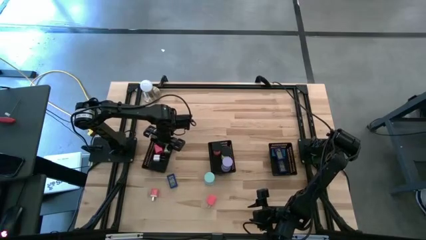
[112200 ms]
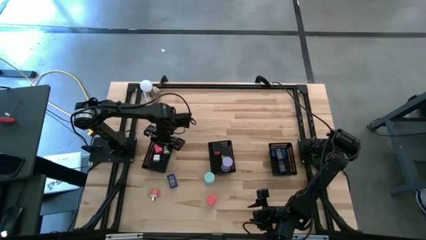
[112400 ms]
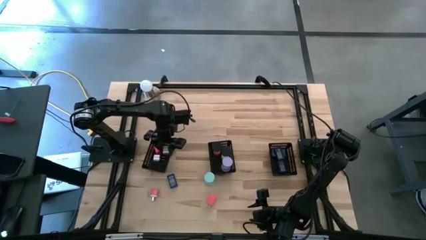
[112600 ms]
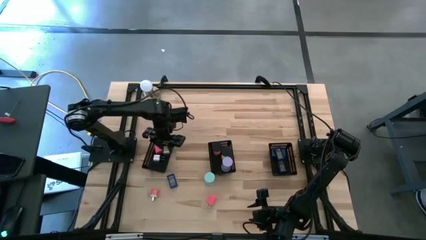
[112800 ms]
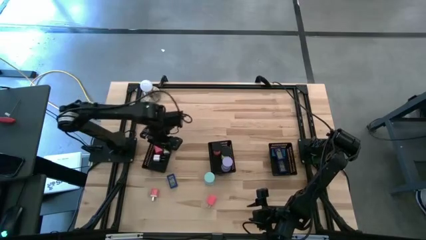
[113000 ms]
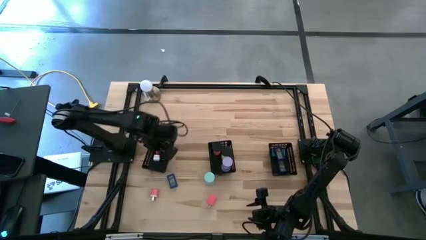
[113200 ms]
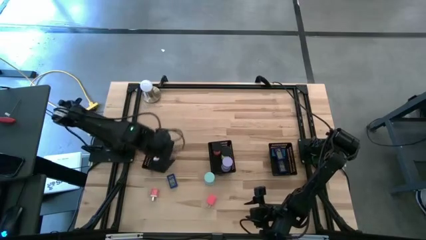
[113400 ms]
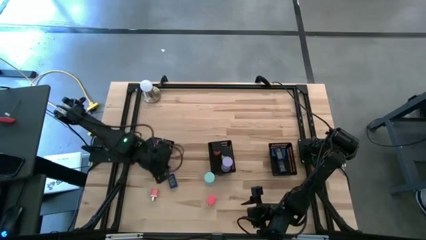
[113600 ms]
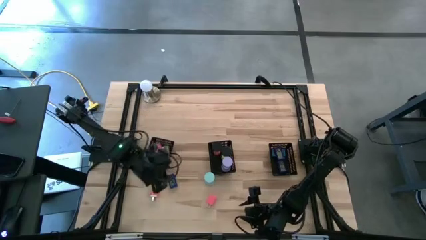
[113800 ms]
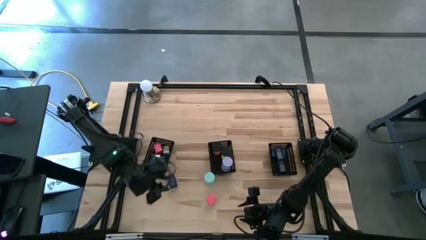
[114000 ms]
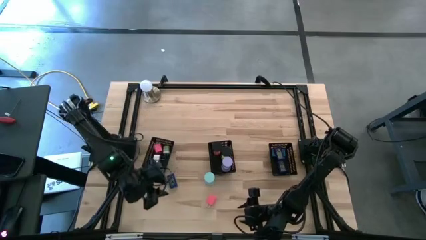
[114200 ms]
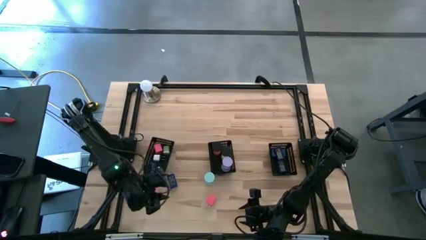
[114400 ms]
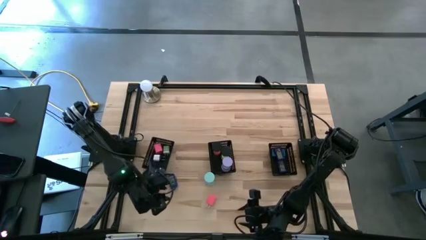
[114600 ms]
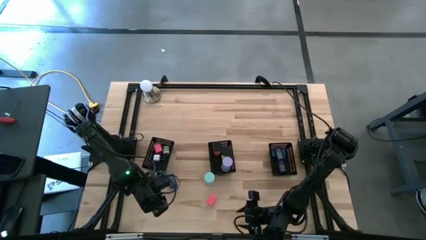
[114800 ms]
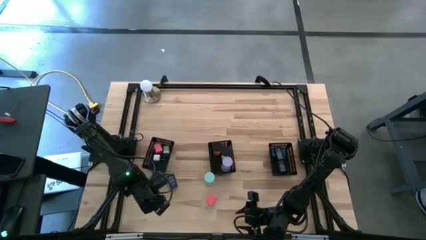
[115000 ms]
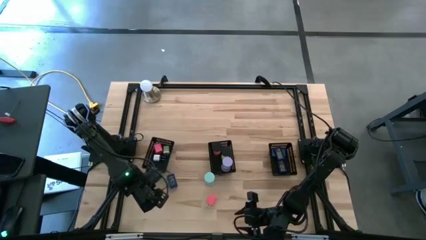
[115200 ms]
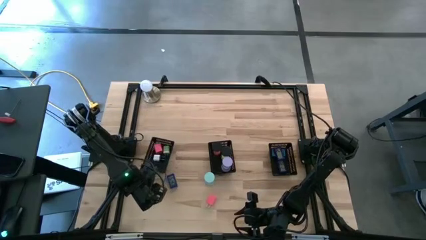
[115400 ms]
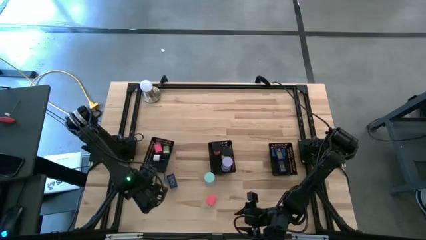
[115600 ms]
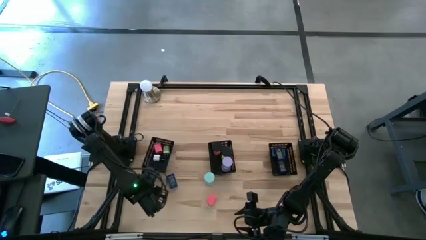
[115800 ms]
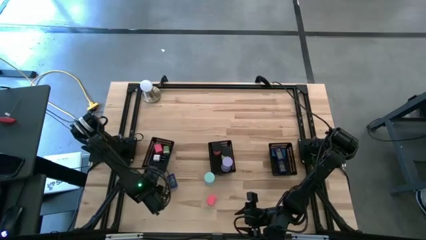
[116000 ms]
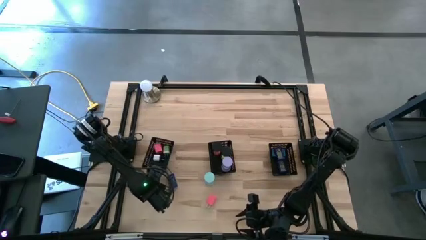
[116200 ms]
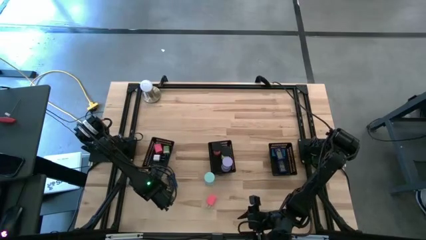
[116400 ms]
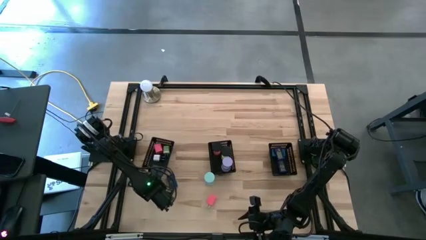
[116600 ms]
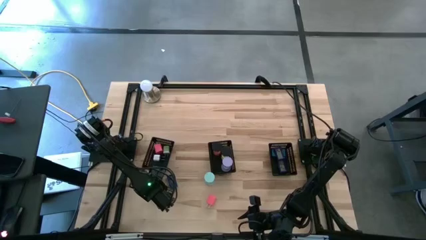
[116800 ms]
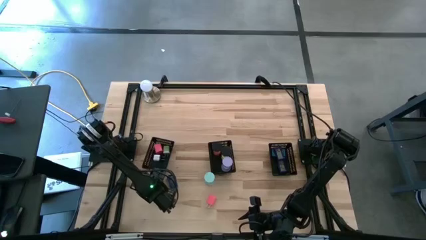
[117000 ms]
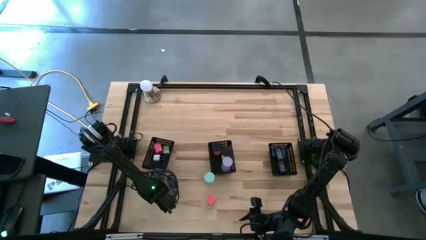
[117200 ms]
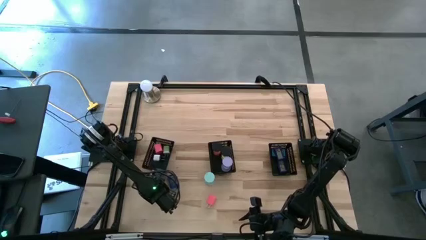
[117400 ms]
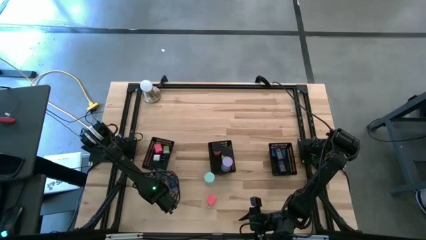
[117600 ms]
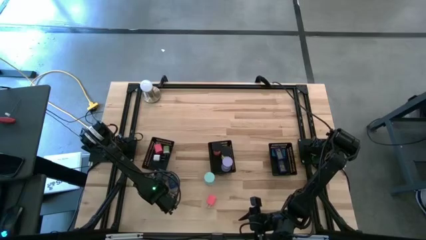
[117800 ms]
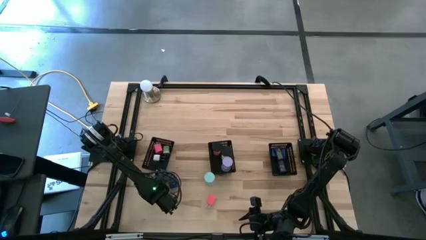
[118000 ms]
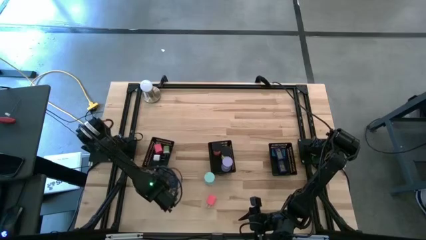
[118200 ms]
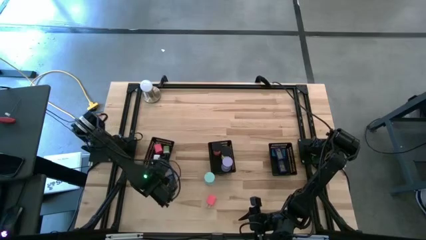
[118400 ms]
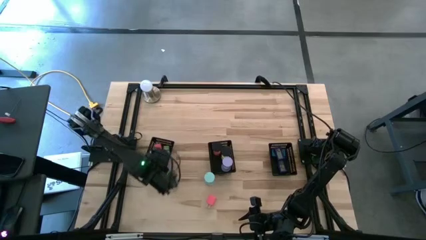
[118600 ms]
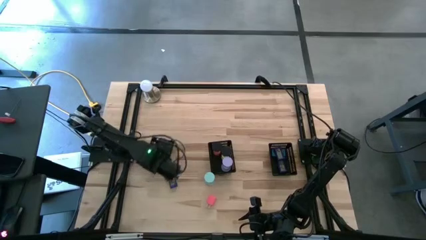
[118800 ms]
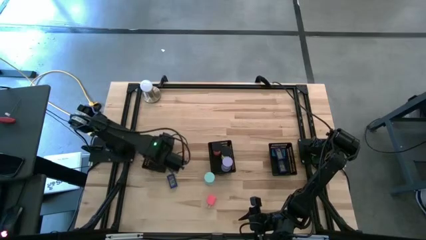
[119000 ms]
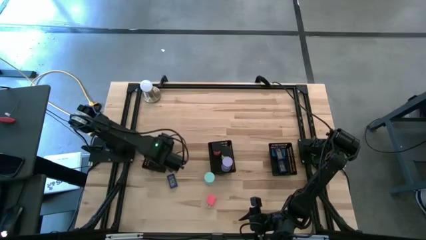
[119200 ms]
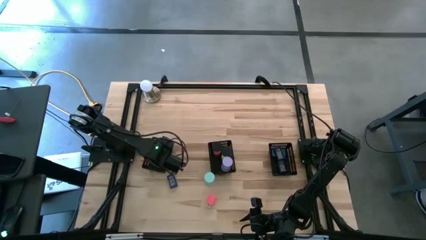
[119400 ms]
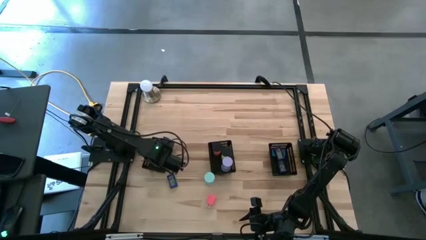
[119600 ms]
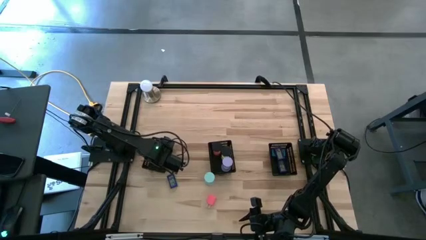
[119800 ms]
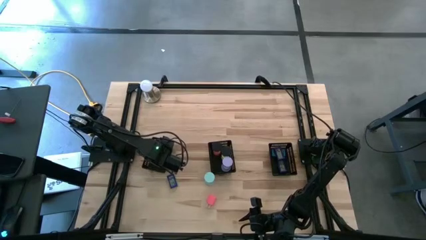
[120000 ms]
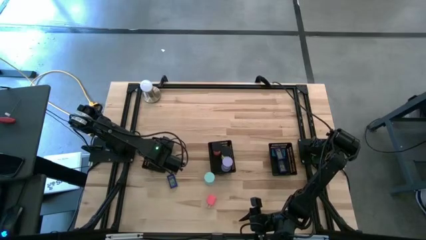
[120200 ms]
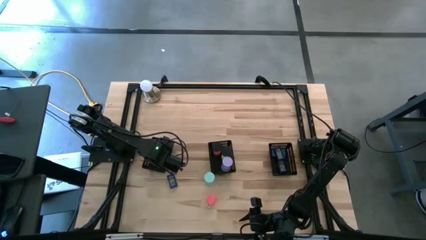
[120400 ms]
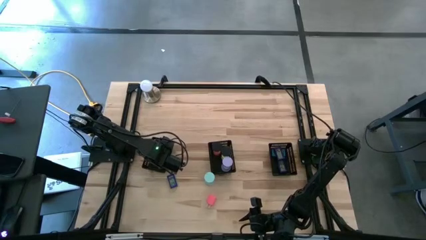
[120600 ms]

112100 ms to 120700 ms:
Task: Pick & Place Office items
Put the white pink charger adapter into the left black bin

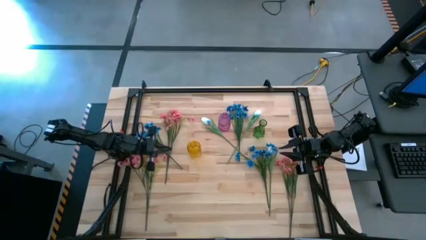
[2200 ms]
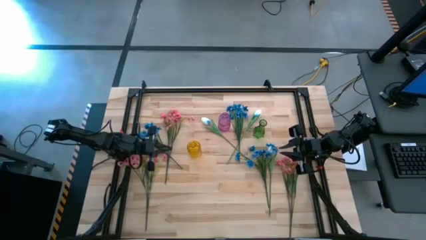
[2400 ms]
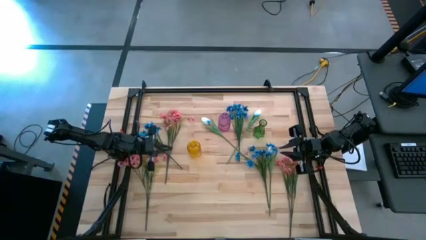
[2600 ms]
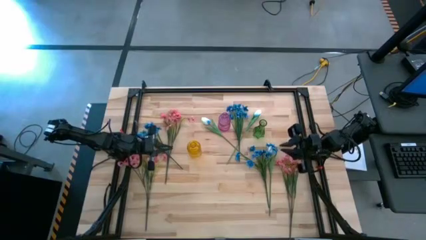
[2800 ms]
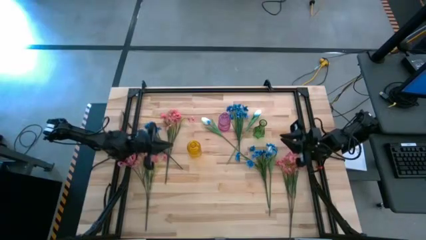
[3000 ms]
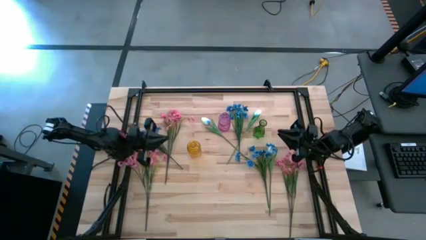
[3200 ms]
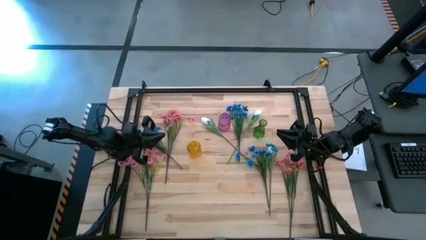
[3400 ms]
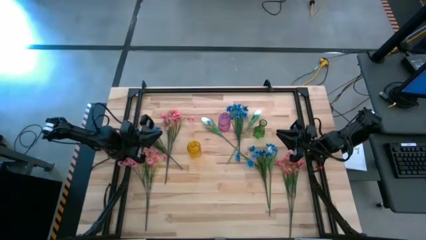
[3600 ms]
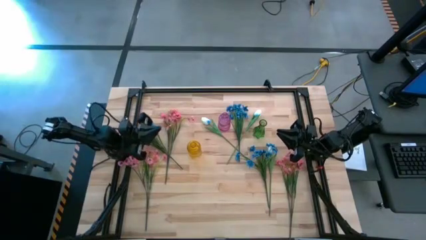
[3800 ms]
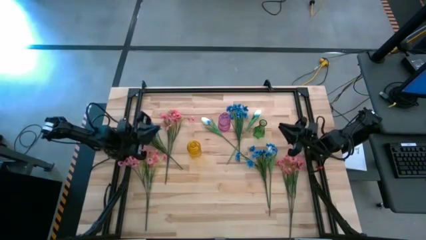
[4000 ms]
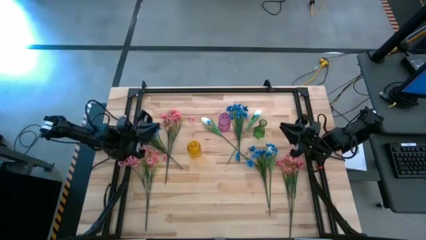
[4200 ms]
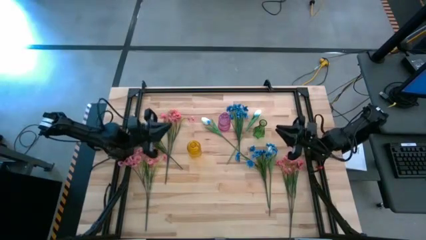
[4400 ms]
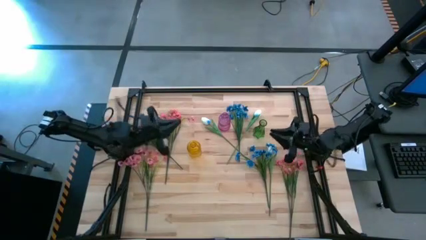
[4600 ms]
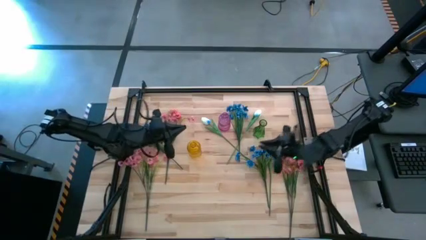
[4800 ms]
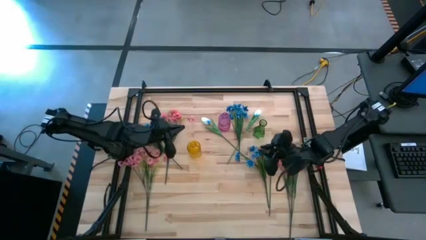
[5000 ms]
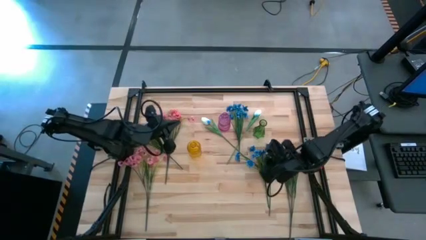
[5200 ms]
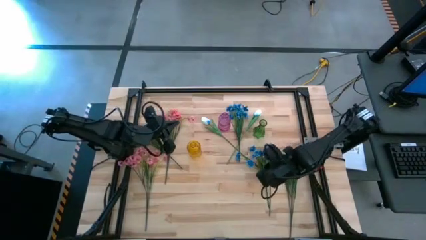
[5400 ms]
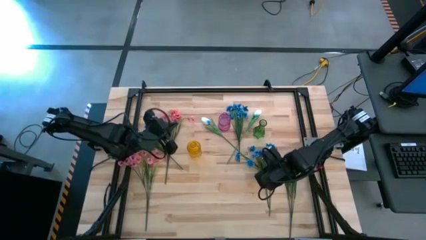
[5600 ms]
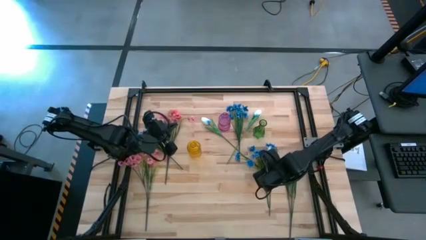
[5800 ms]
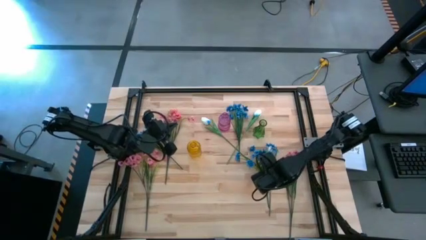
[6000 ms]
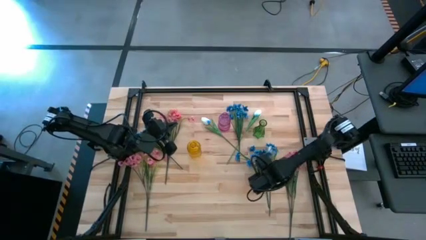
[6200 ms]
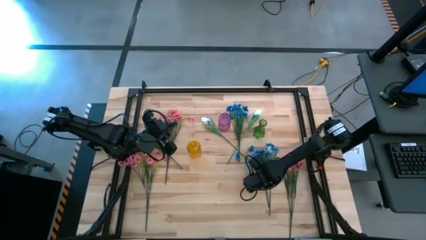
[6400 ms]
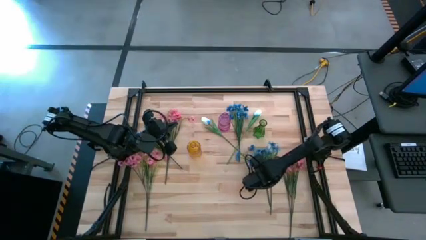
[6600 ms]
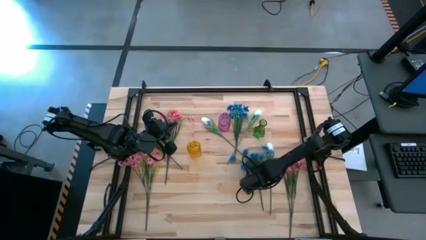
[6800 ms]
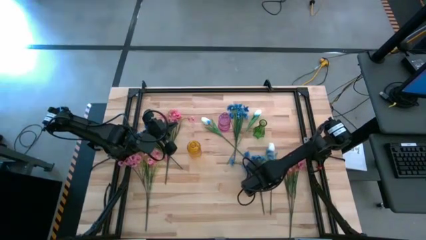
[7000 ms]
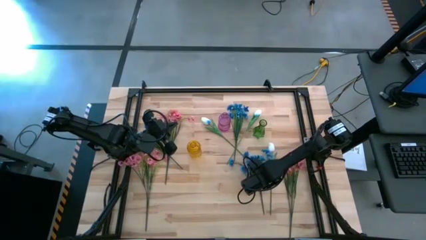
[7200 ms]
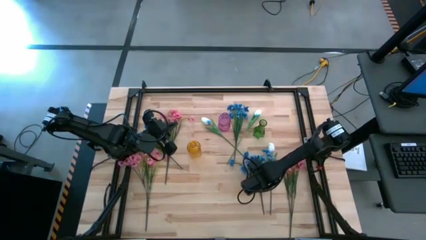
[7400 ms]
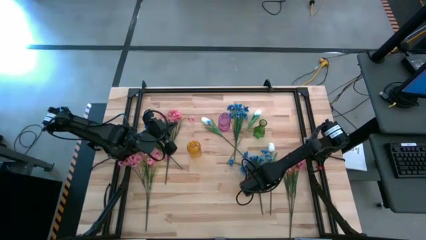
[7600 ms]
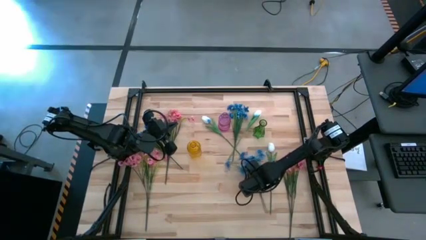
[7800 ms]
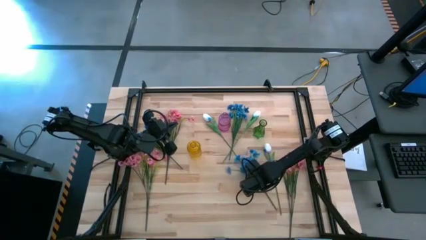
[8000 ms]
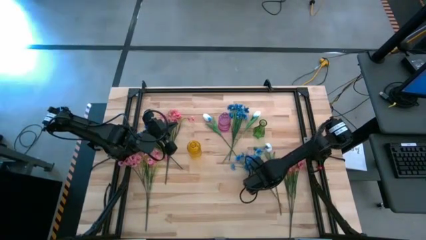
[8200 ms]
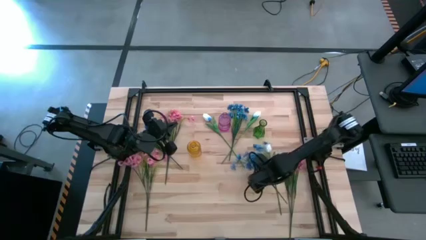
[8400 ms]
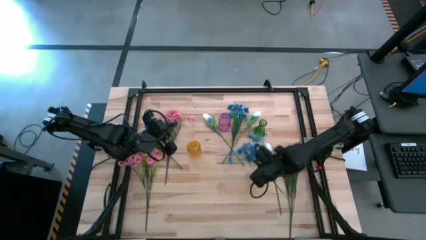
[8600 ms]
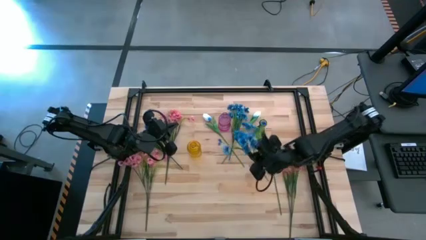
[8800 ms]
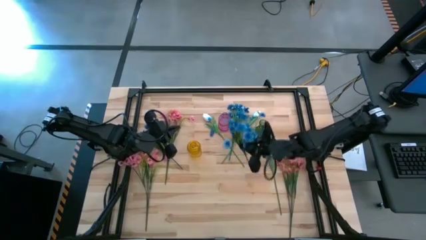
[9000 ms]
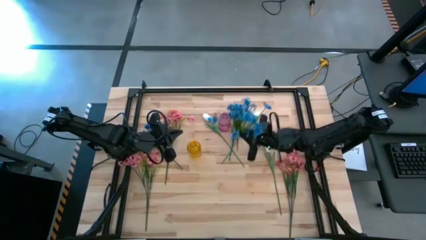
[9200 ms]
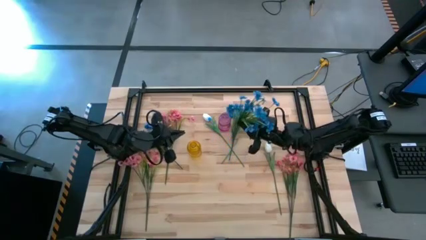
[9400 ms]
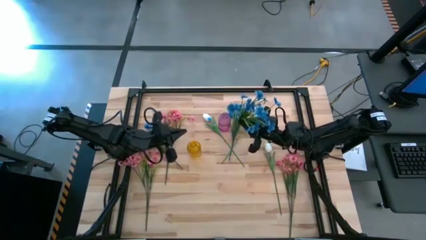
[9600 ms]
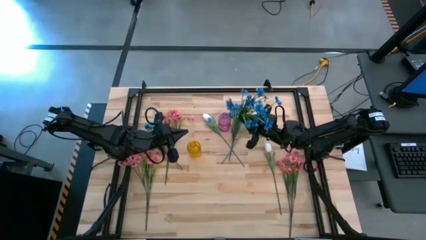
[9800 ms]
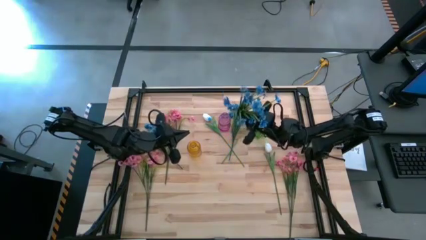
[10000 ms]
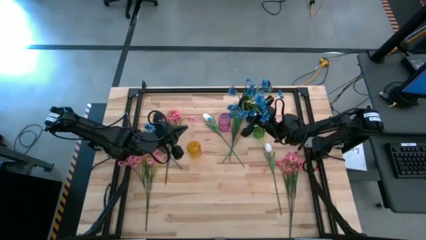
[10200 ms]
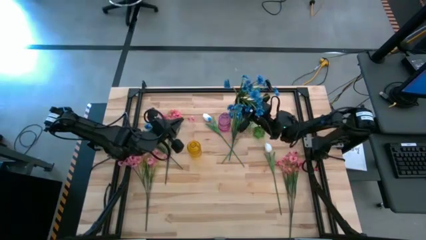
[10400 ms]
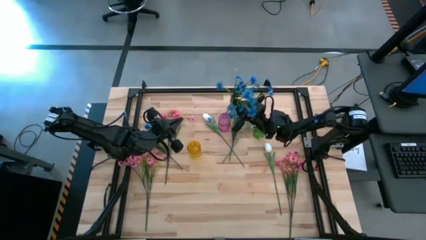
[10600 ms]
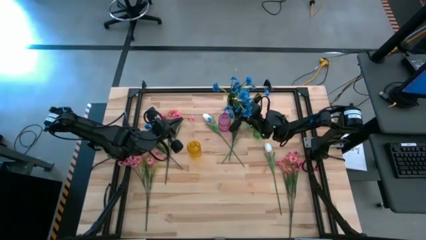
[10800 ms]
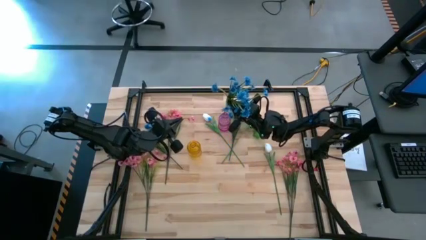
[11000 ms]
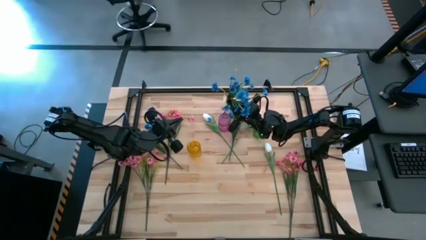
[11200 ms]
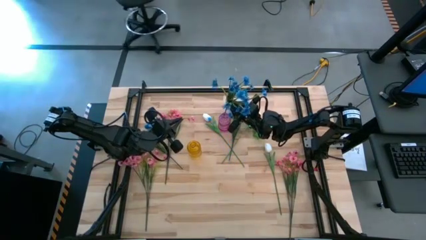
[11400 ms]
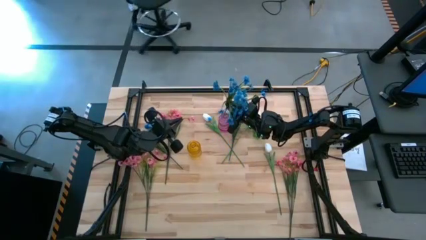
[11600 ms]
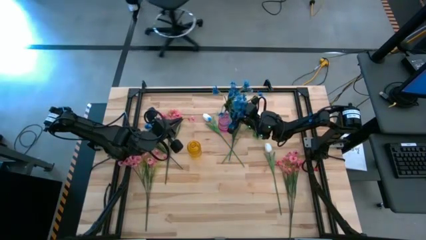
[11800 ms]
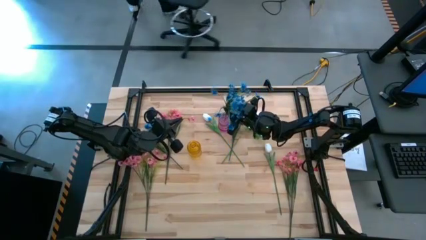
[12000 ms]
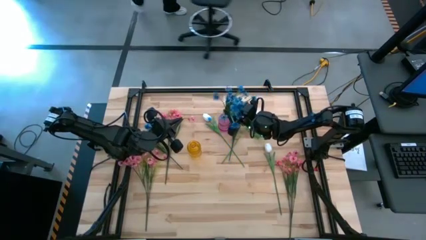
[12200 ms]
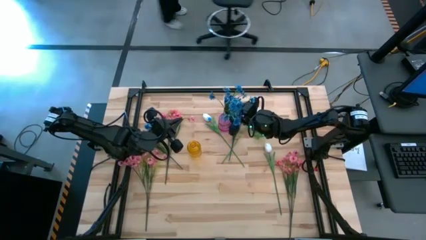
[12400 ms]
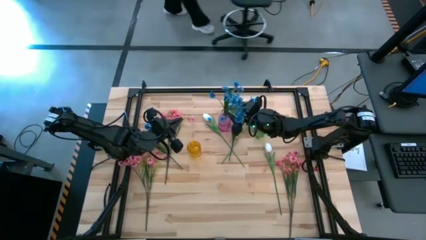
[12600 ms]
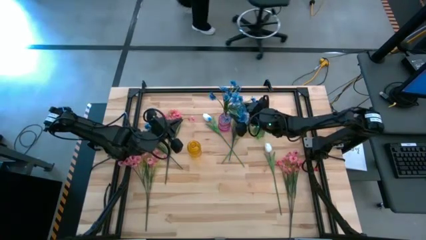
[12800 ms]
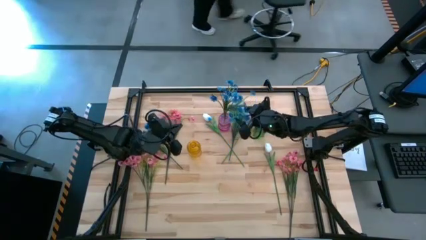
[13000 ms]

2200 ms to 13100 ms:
Task: Sort flowers into vase by color
Put the bottom right blue flowers into the purple flower vase
